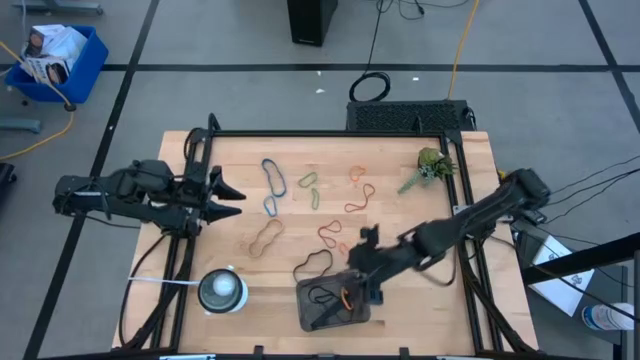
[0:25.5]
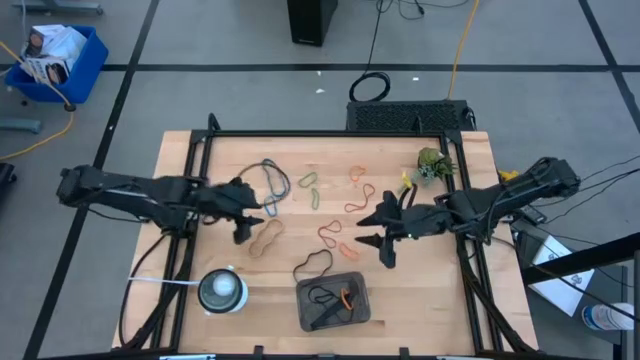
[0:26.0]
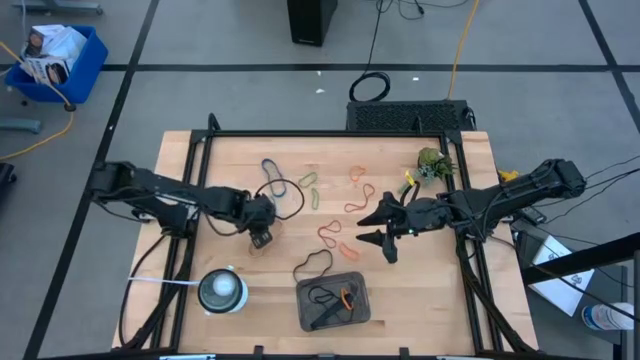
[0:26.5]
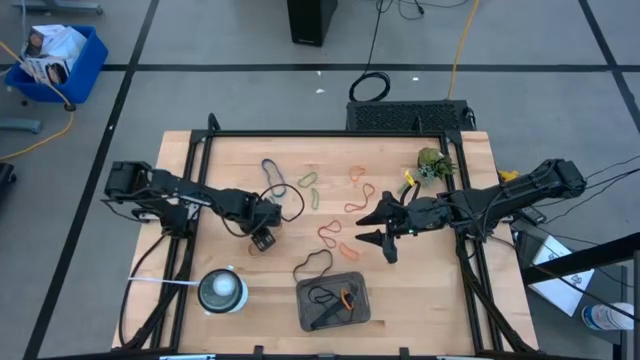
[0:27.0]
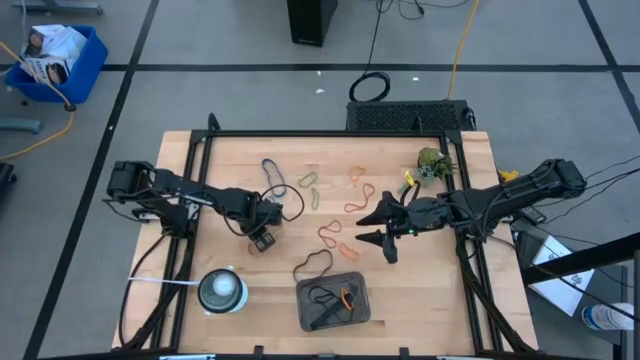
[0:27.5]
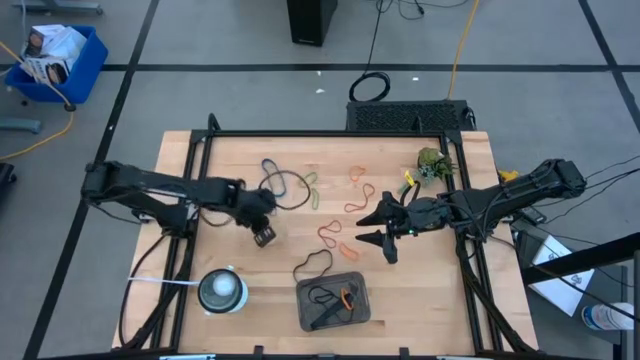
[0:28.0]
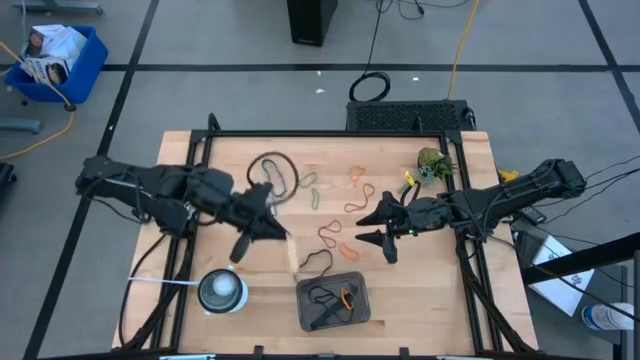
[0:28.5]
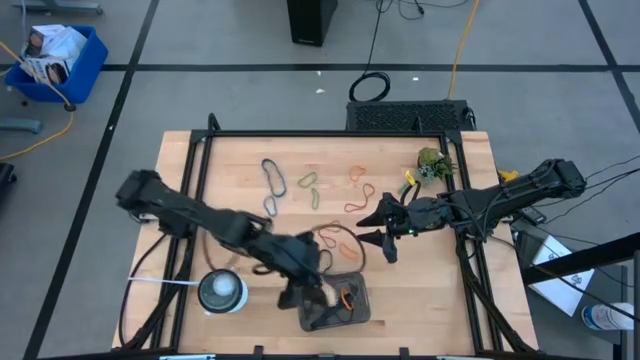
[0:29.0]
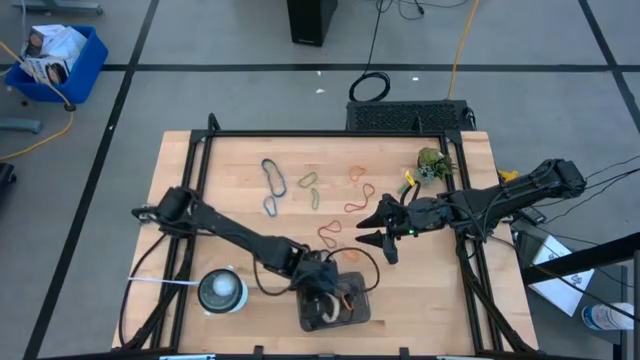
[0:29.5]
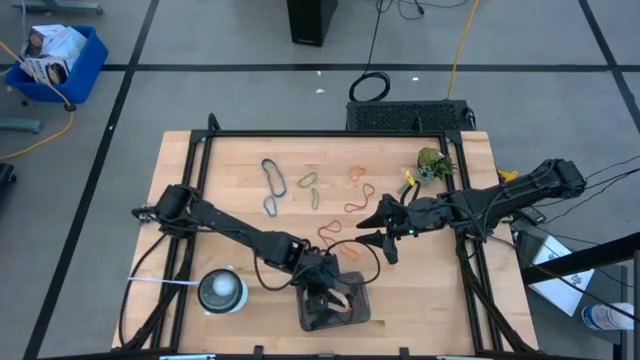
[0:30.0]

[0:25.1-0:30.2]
Task: Pick and place rubber bands into bin
Put the light brown rubber band into the bin

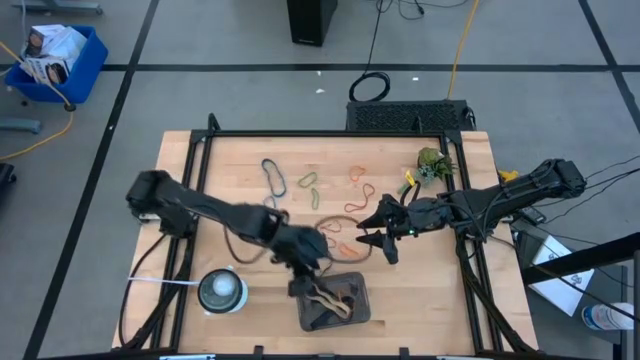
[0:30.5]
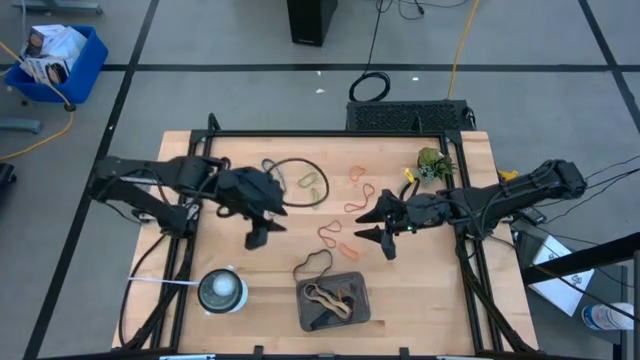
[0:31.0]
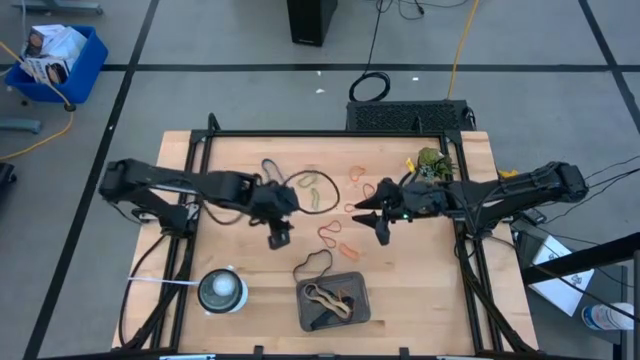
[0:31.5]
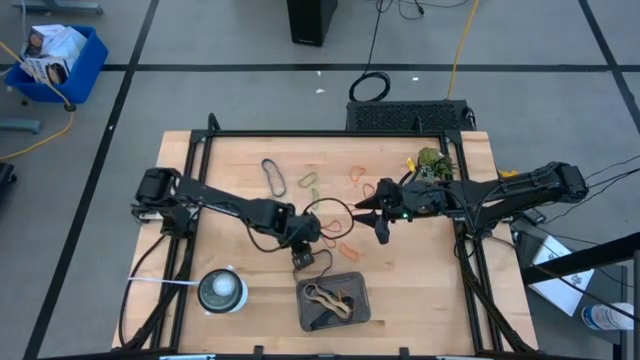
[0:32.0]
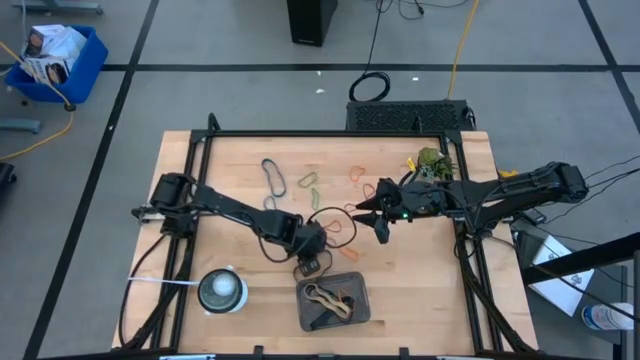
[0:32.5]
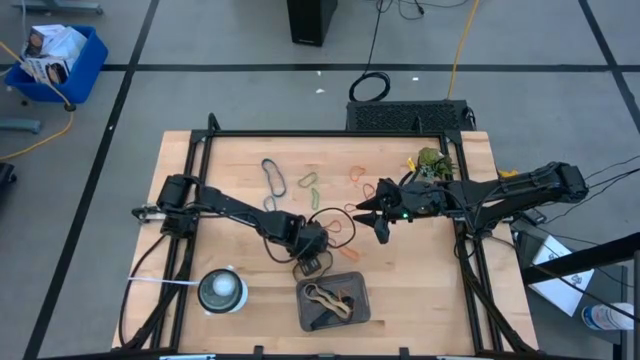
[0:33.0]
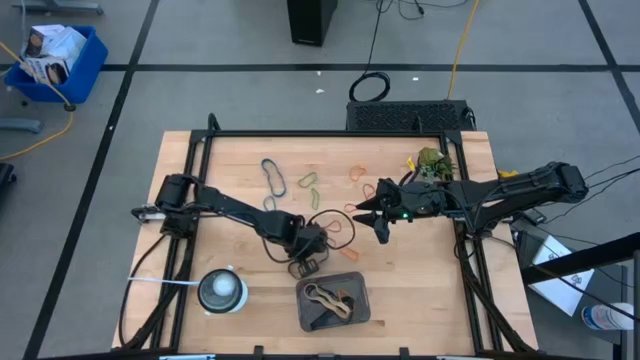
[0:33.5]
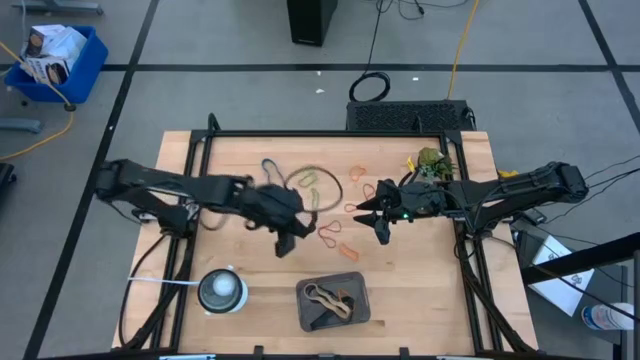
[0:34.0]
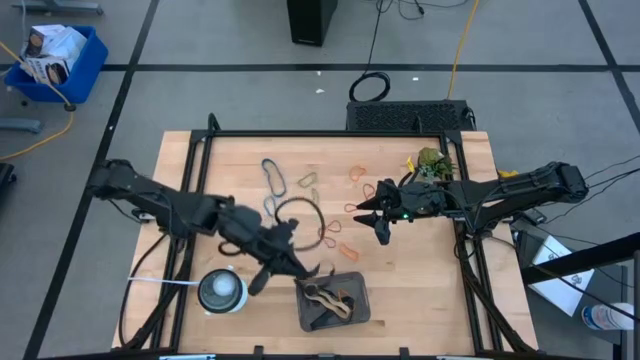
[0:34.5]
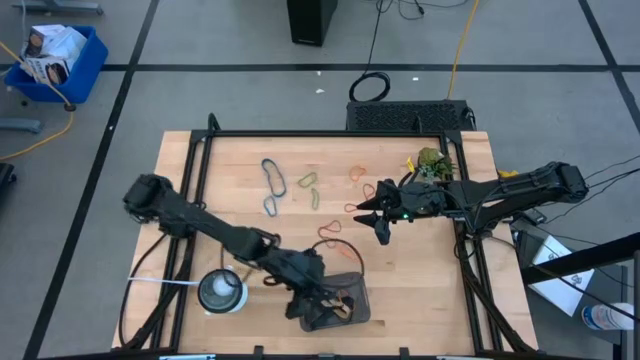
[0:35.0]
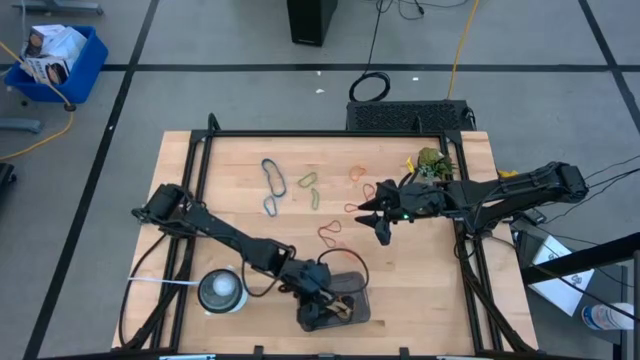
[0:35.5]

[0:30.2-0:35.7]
Put the black rubber band into the bin

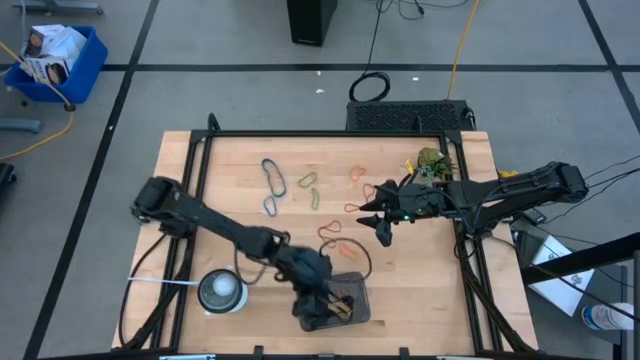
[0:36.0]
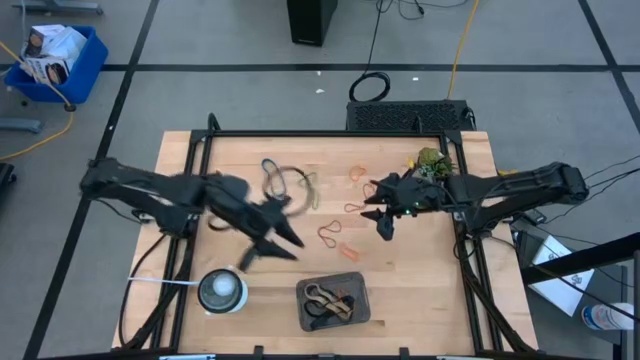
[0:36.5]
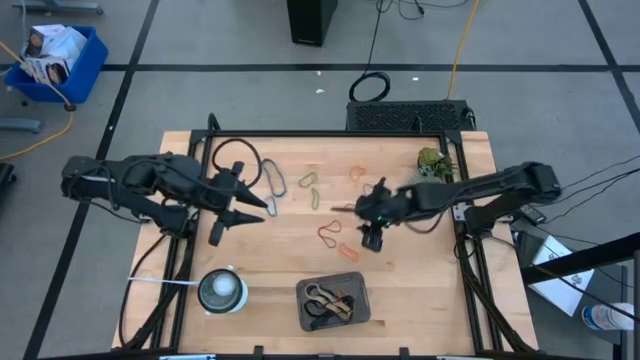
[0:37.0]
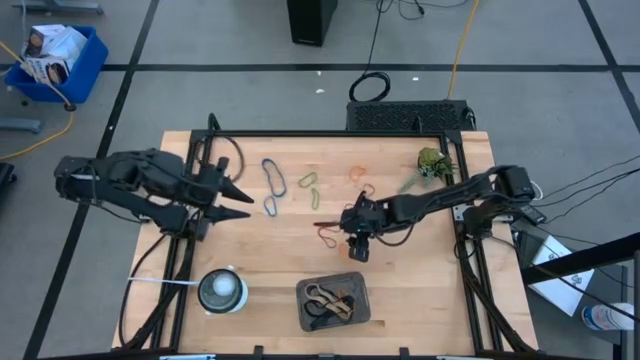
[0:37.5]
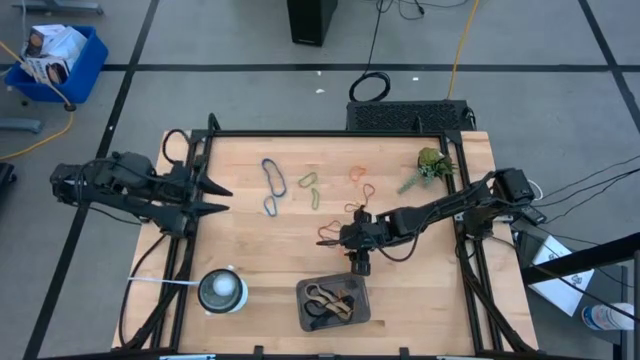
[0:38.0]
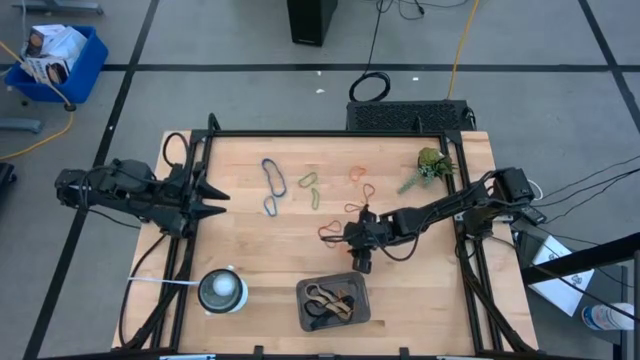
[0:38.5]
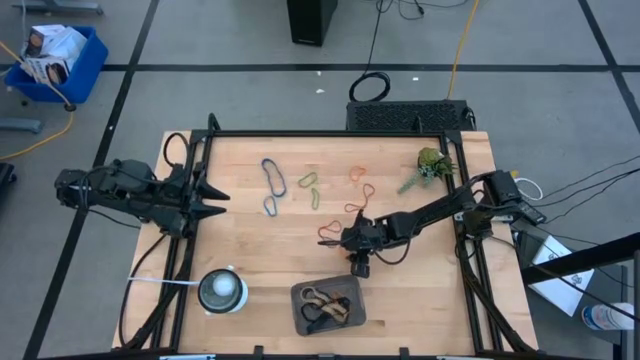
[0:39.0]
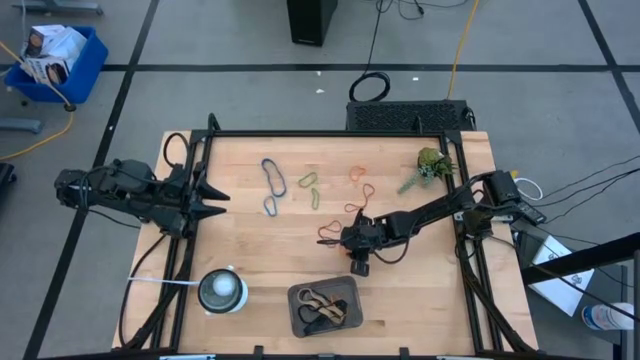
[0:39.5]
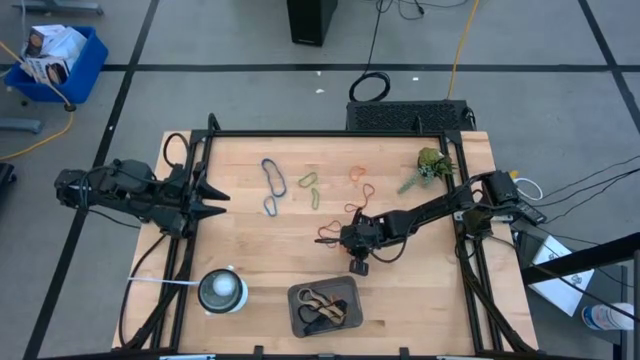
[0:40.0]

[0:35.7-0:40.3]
Put the bottom orange rubber band into the bin

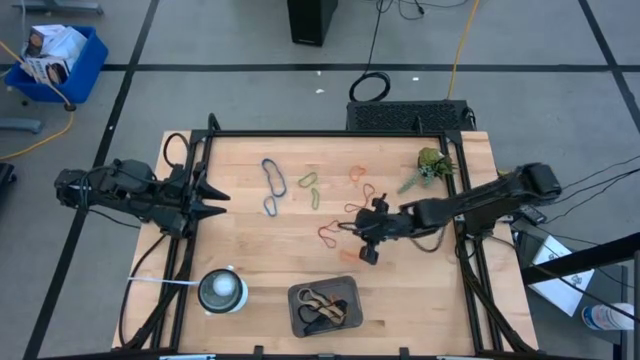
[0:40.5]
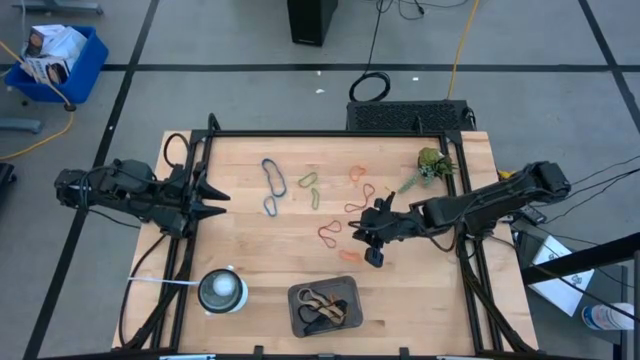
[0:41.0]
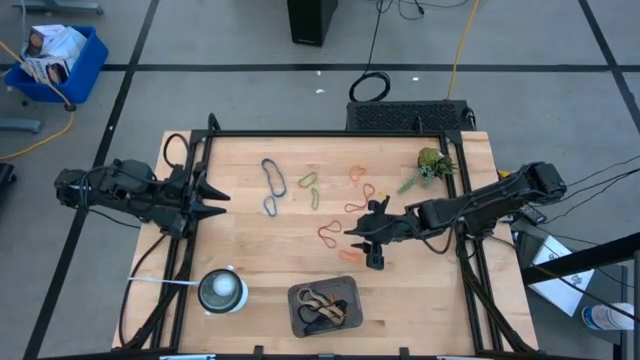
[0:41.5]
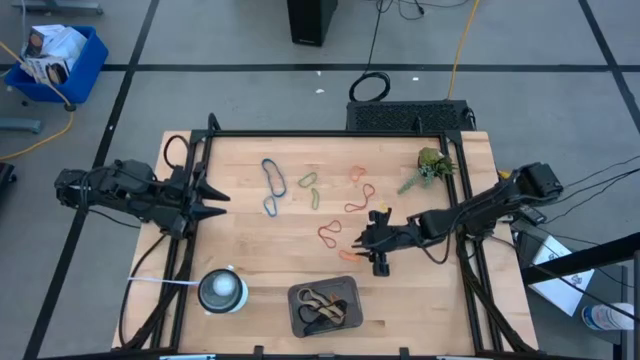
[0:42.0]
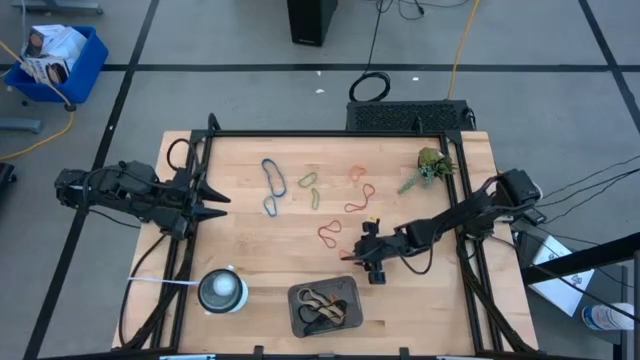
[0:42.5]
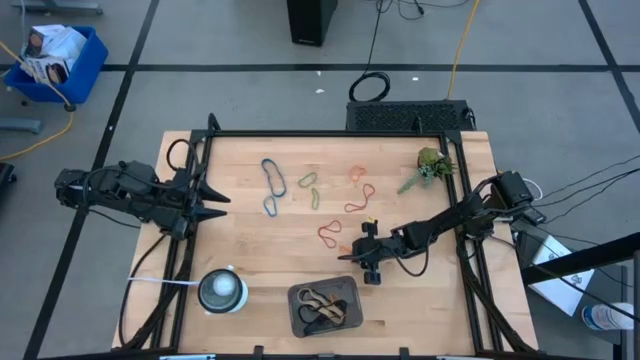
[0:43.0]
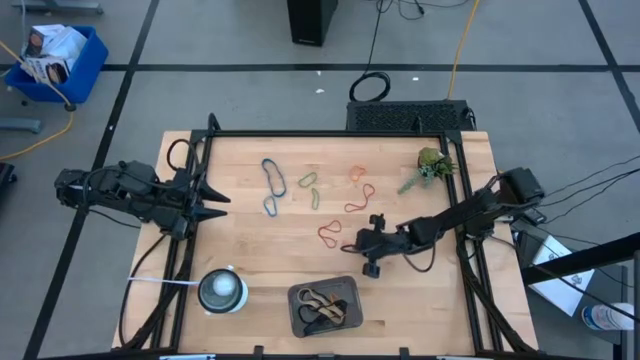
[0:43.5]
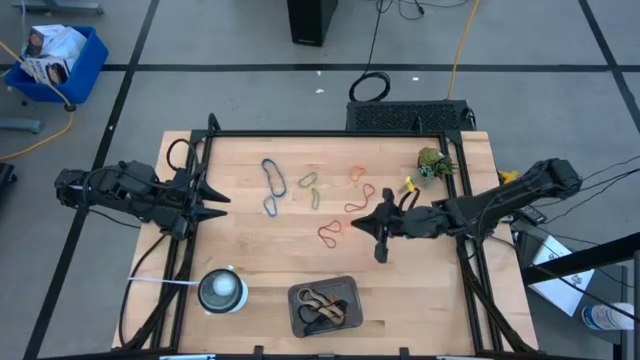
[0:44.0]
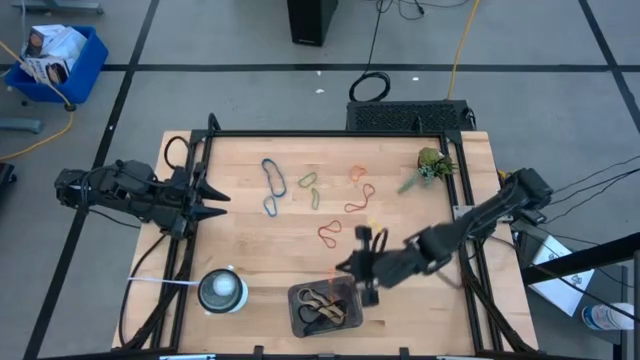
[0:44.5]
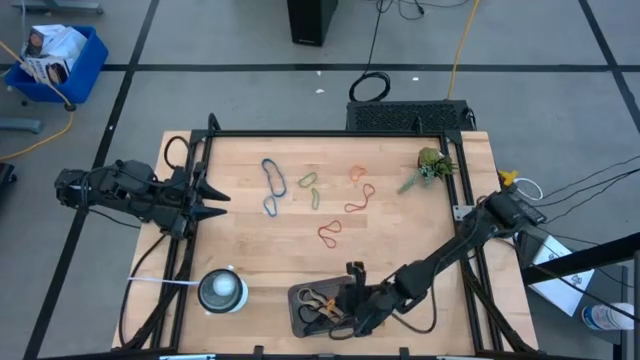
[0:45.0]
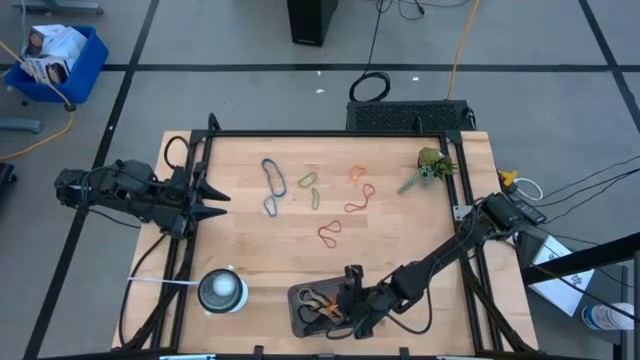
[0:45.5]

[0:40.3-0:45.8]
Put the bottom orange rubber band into the bin

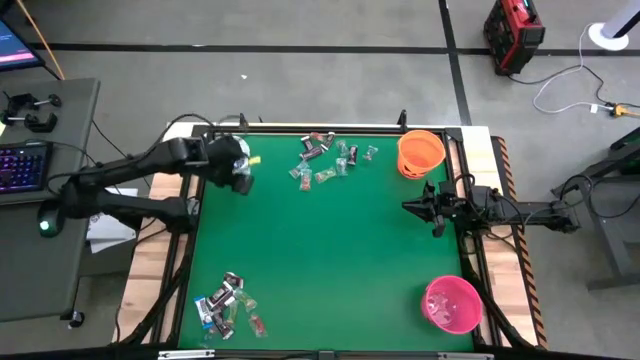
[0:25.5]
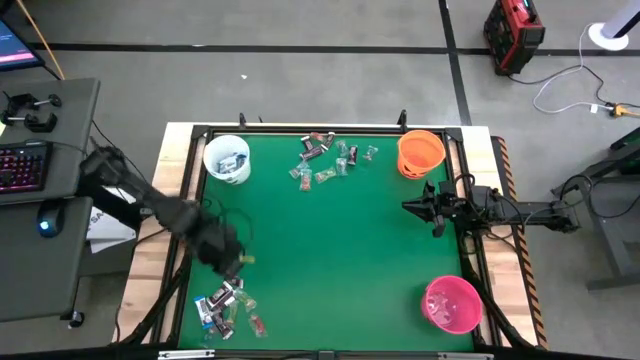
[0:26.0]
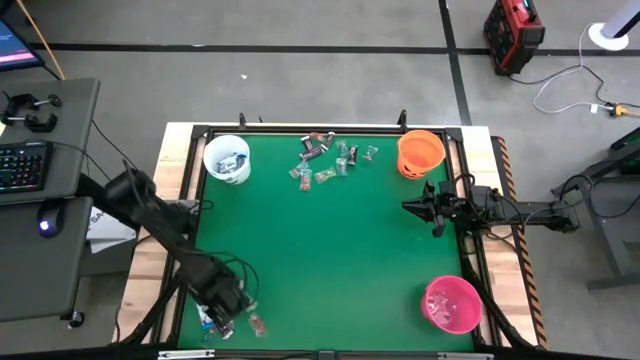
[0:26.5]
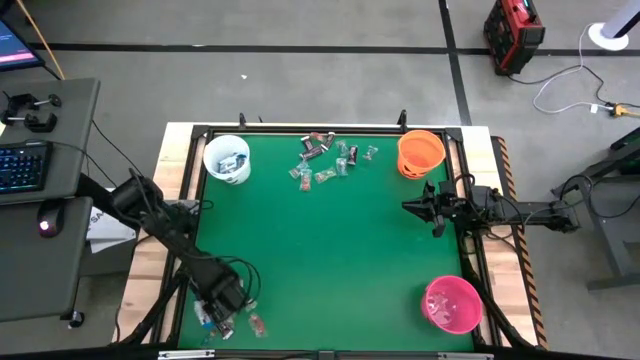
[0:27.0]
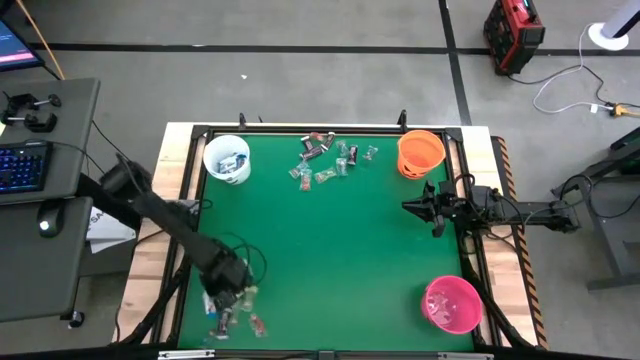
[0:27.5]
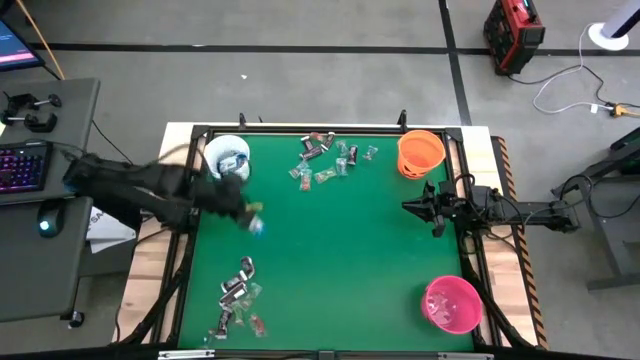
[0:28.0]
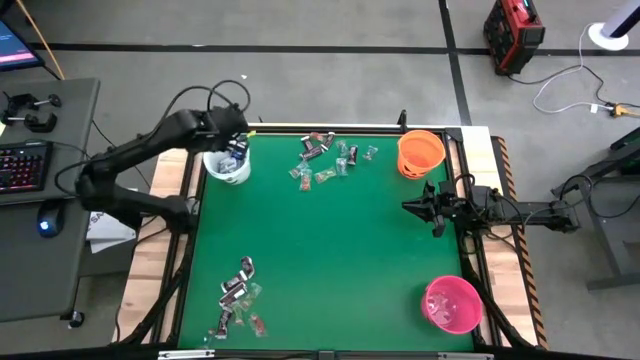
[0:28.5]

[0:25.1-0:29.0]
Task: Sort candy by brand, put in halloween buckets
Put the white chocolate bar into the white bucket
